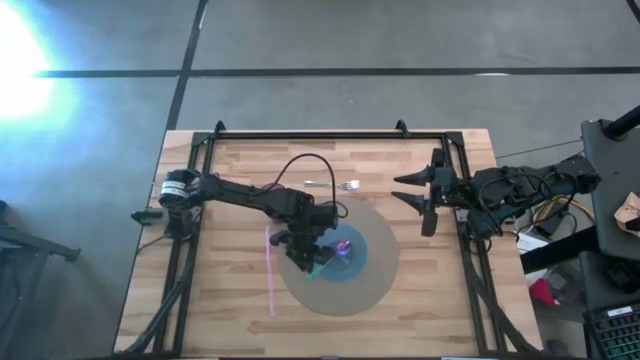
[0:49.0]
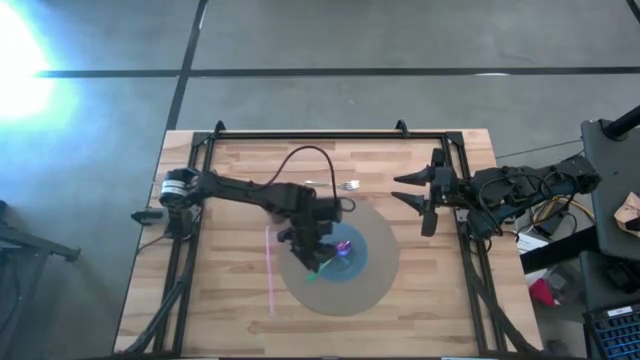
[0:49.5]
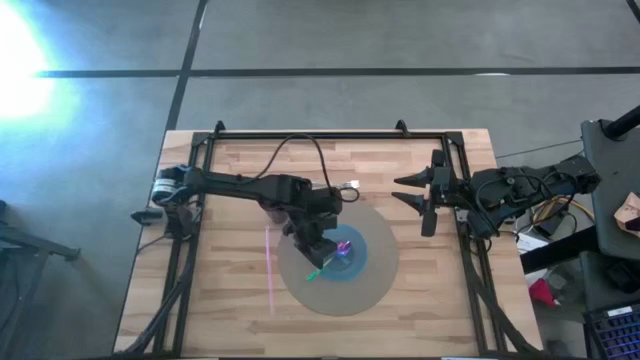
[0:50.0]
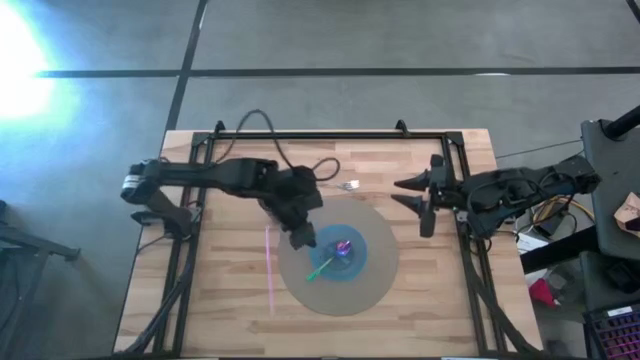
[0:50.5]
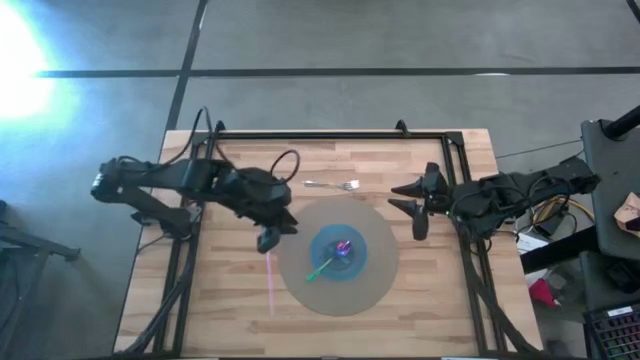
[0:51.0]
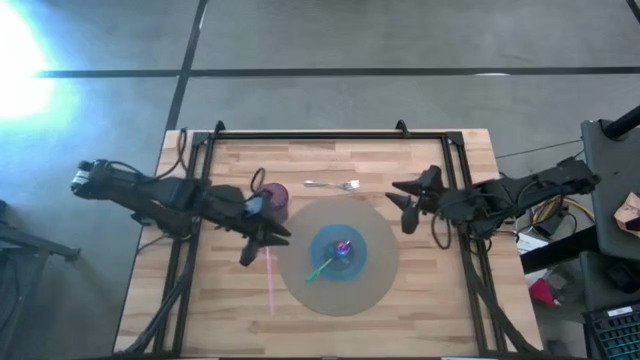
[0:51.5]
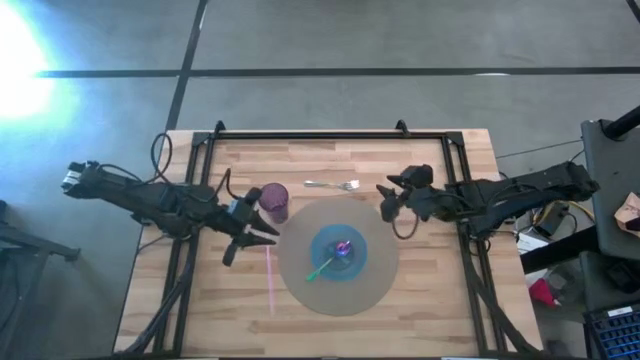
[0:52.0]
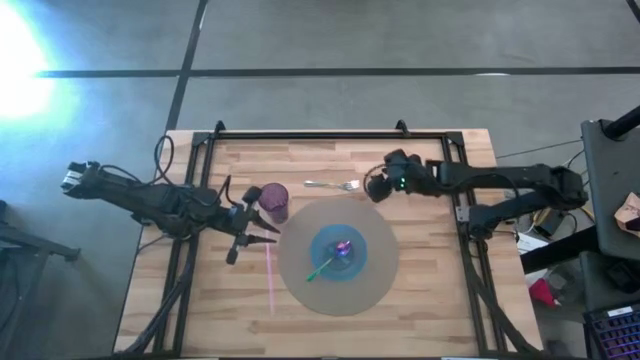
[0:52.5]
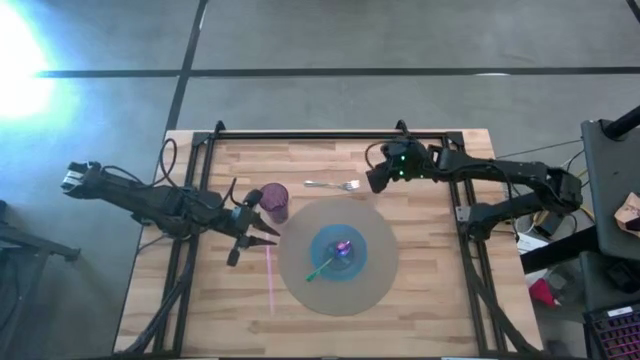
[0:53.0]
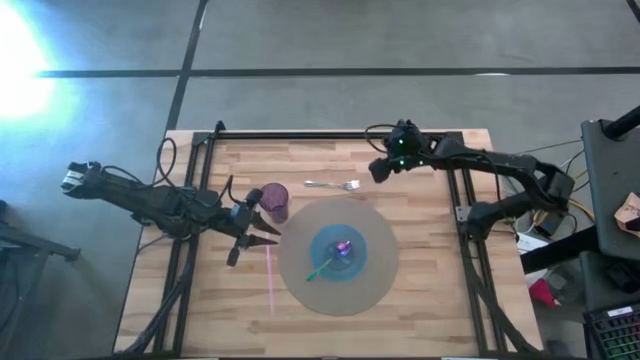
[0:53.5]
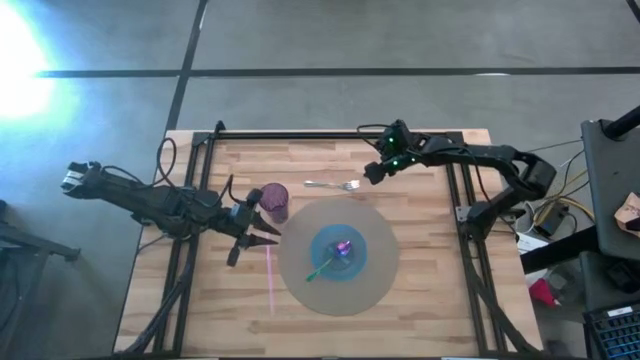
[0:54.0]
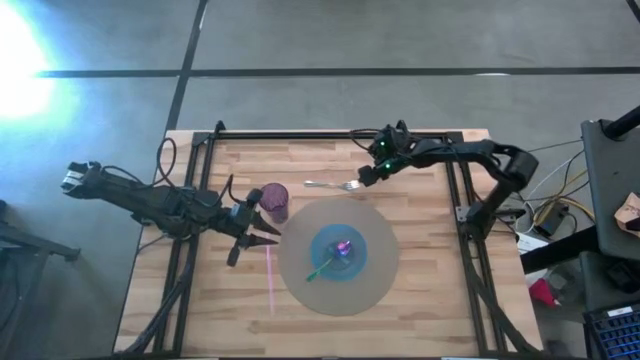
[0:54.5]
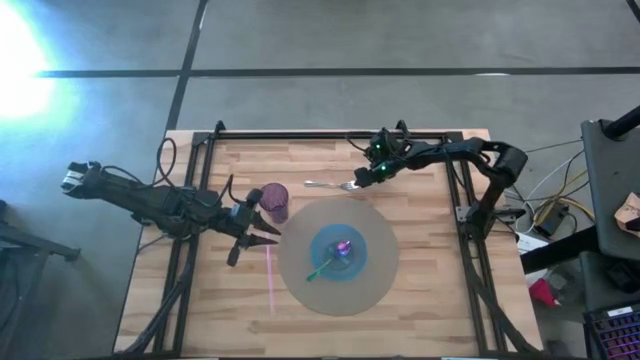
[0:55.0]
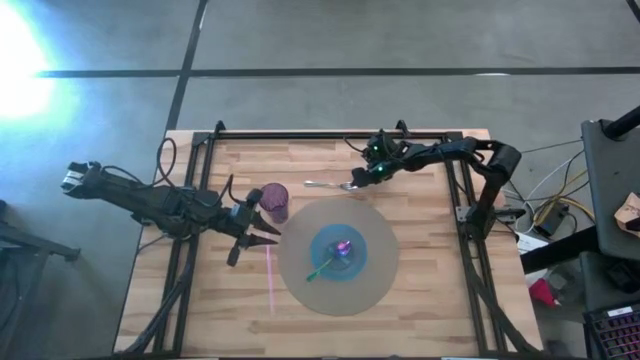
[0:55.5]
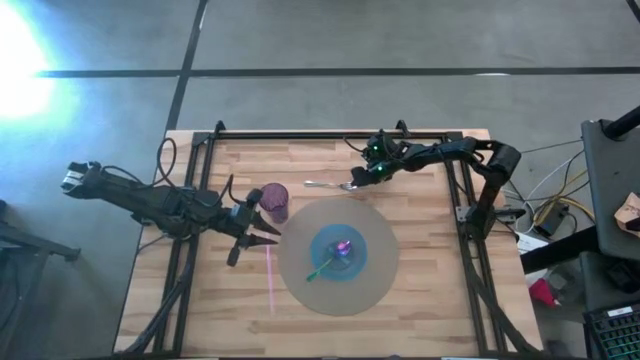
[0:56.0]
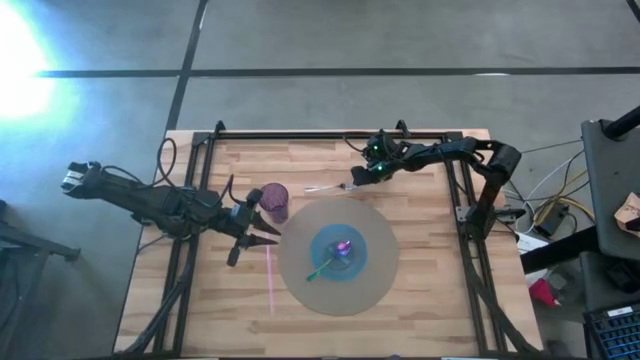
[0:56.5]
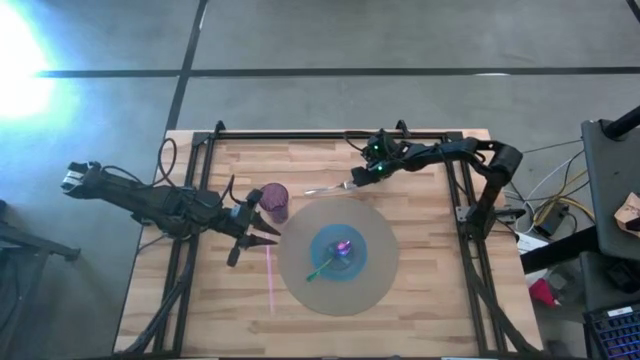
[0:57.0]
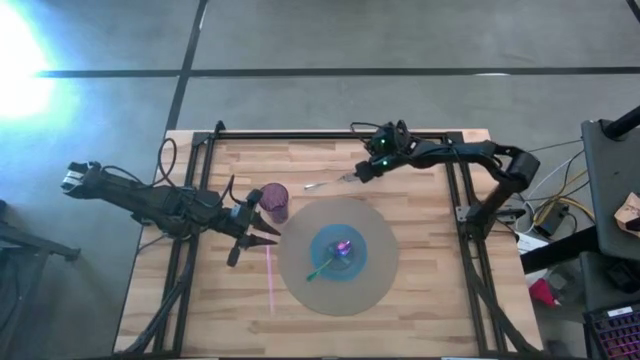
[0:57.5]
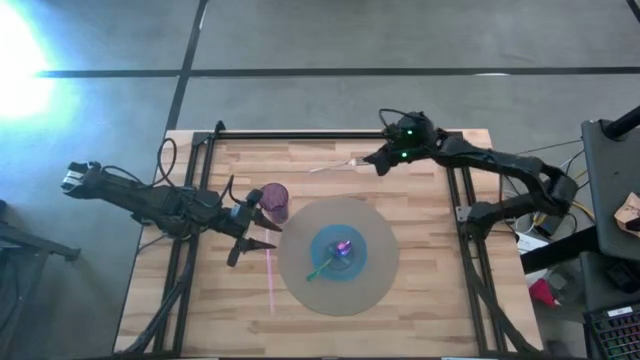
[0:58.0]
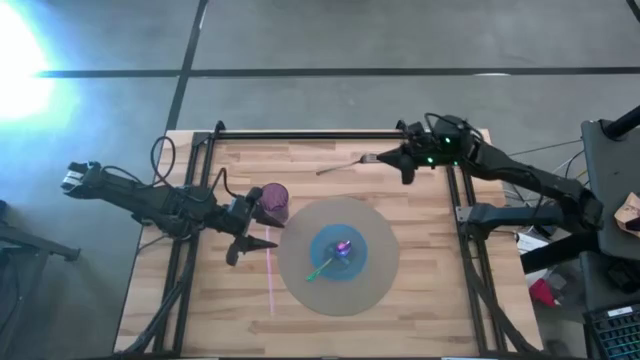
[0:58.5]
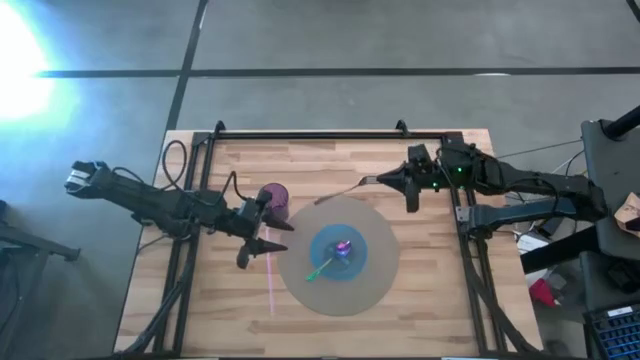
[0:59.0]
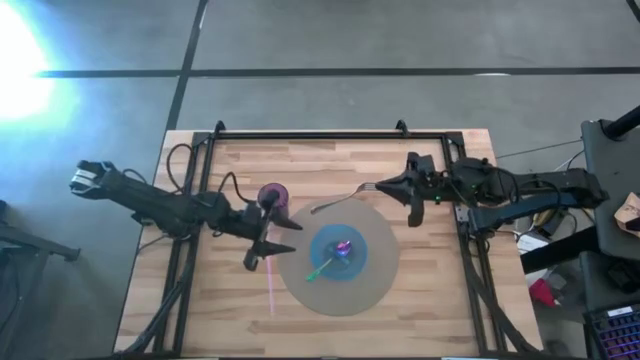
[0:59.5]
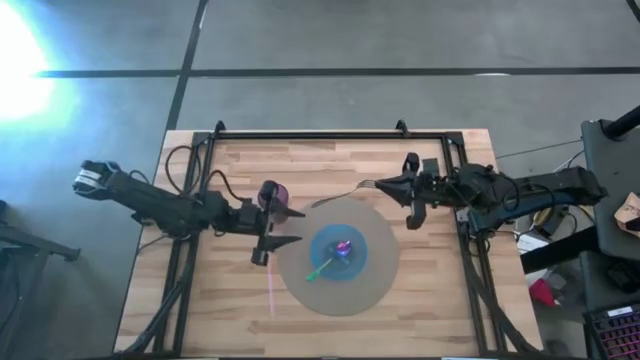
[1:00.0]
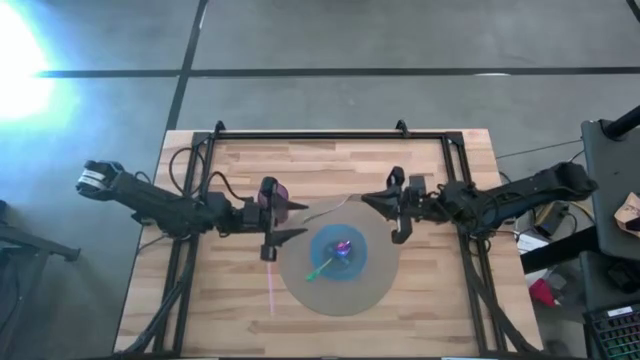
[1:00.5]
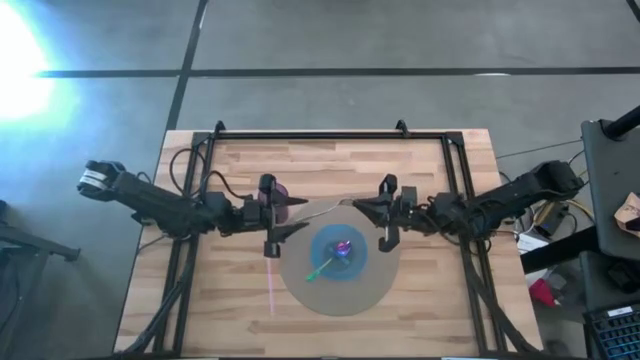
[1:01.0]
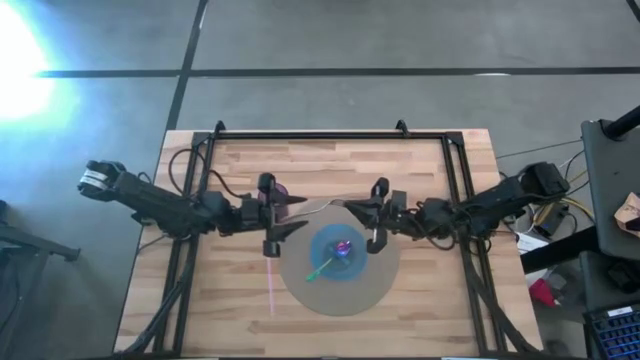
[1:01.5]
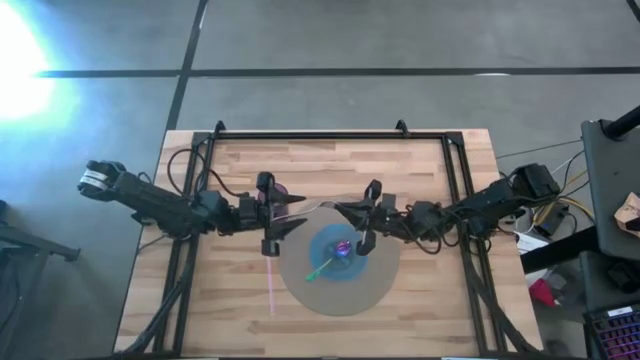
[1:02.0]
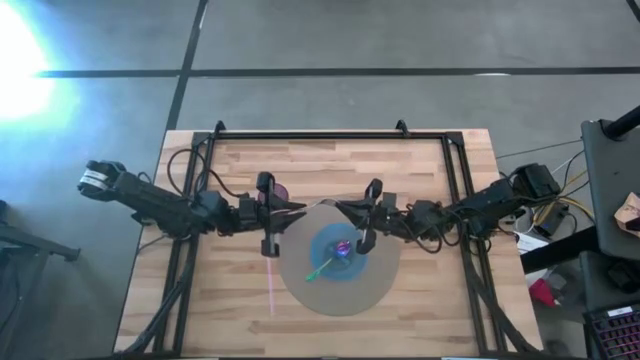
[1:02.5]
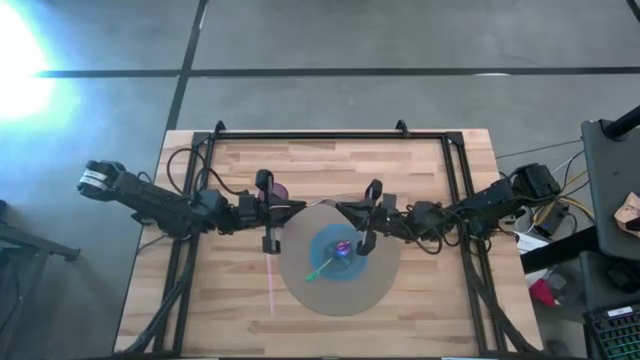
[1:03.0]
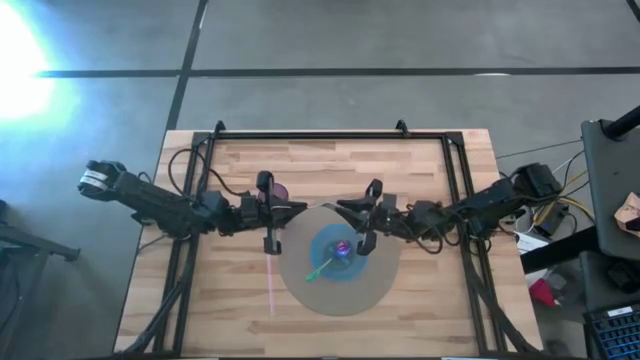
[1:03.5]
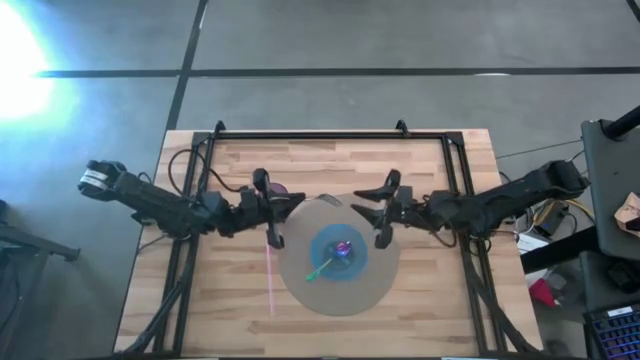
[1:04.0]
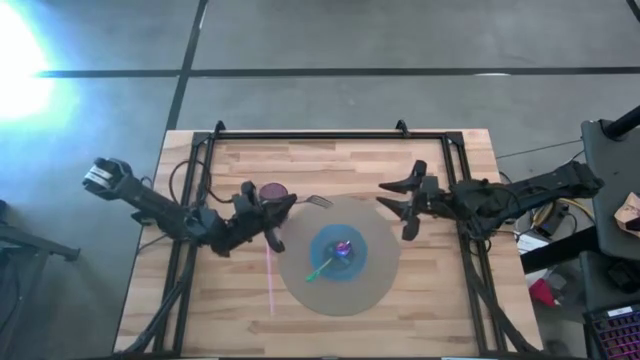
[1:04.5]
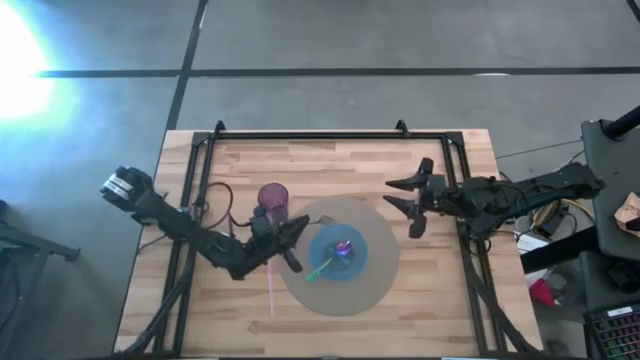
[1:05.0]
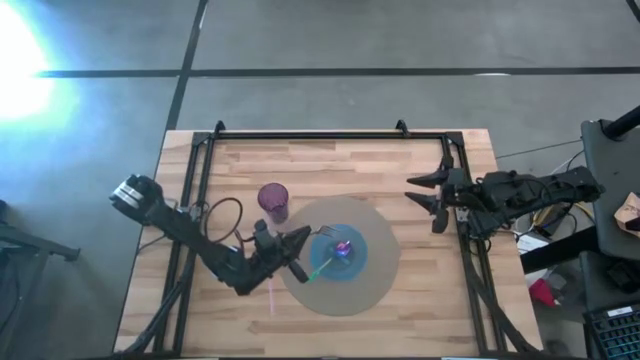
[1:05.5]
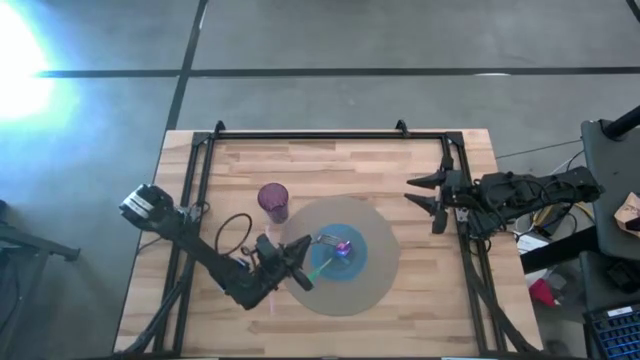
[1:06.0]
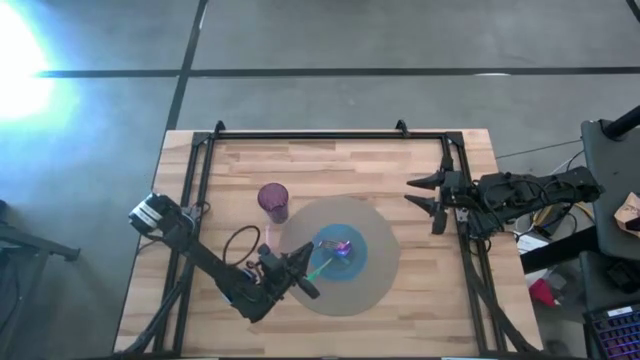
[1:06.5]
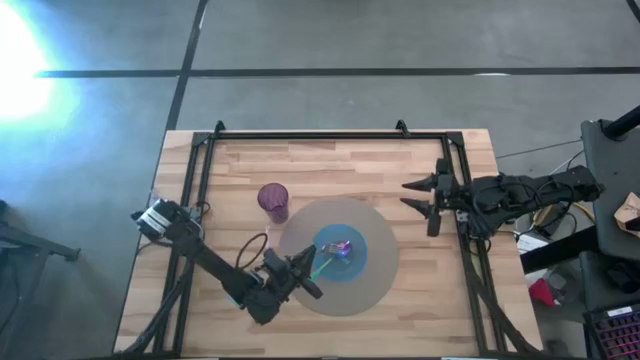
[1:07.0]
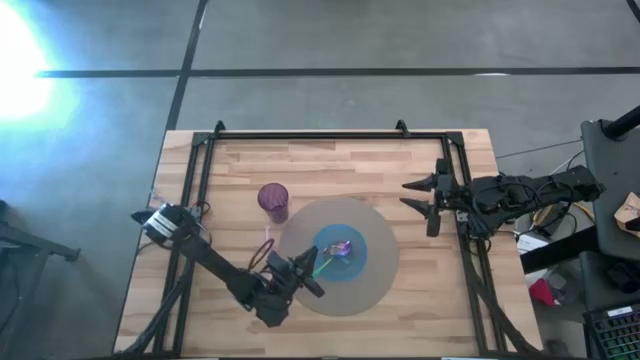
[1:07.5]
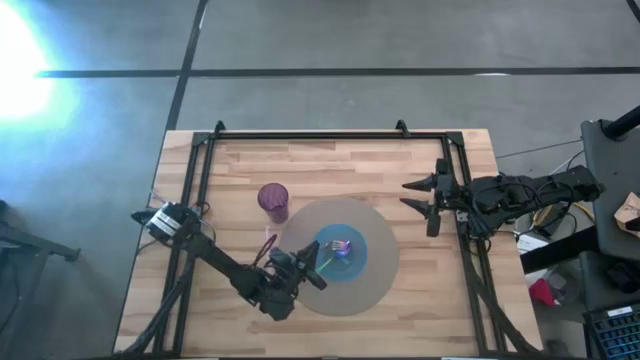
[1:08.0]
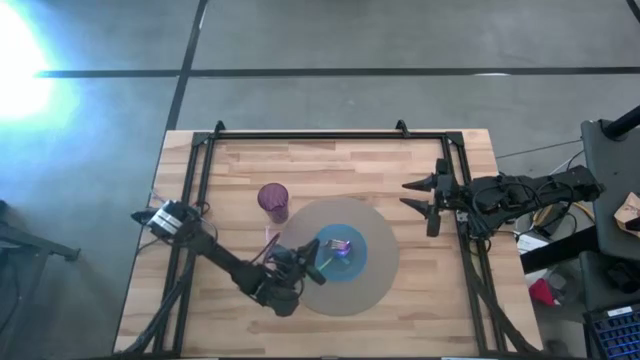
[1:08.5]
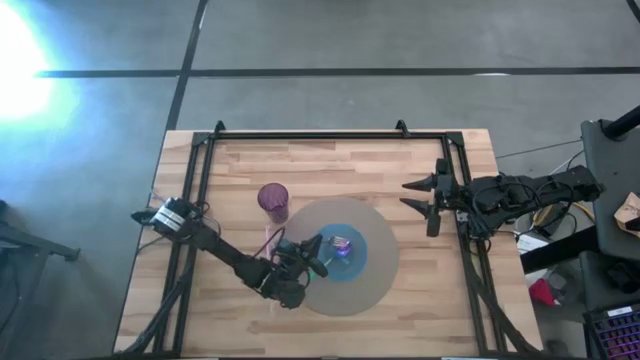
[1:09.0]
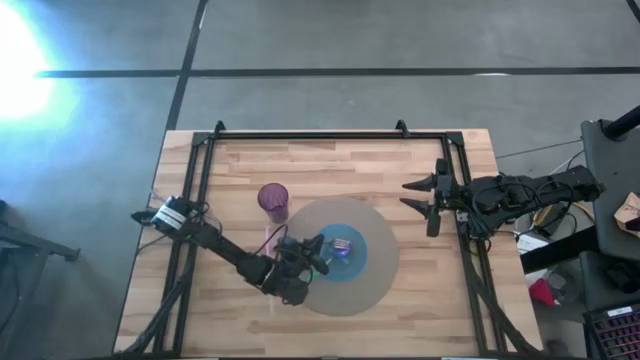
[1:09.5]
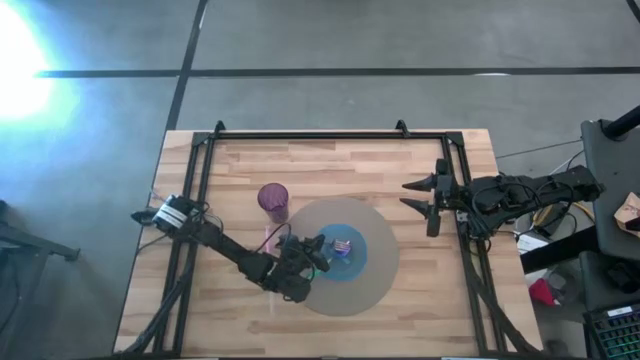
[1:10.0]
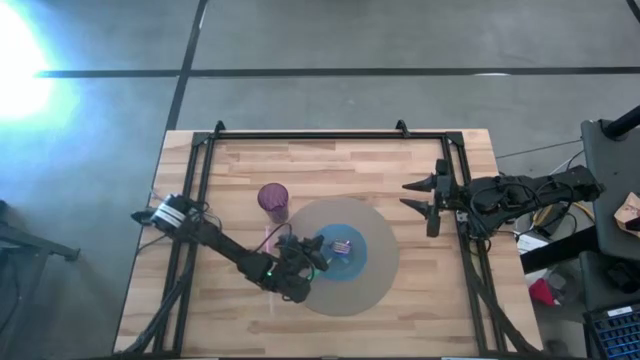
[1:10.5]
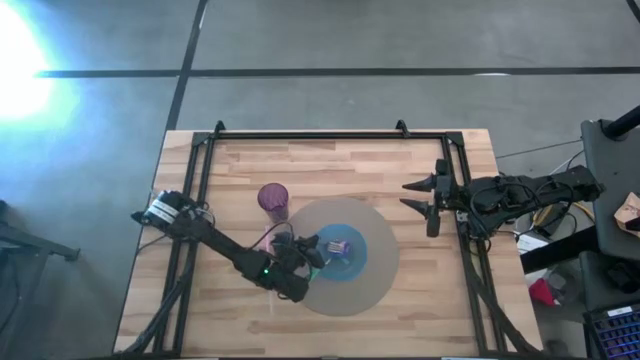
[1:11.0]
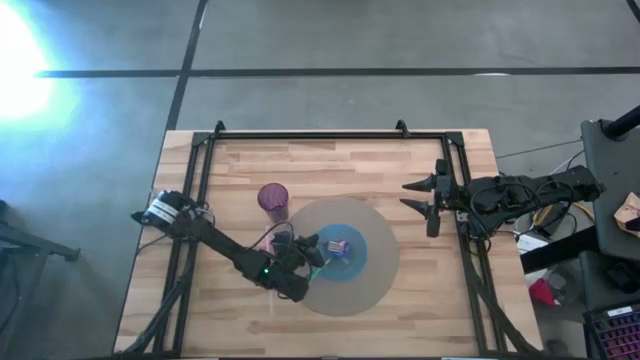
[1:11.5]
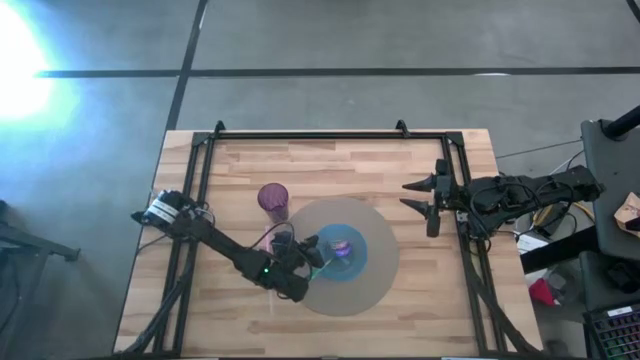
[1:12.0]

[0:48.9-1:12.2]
Task: Pick & Place Utensil
Put the purple spoon into the bowl
